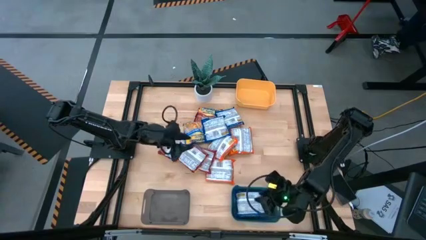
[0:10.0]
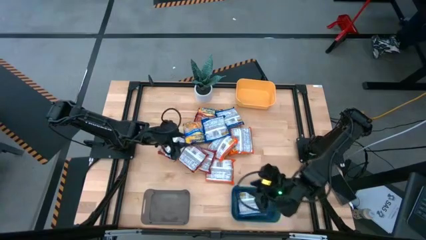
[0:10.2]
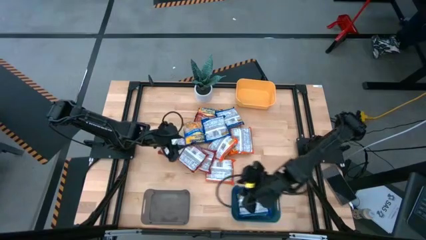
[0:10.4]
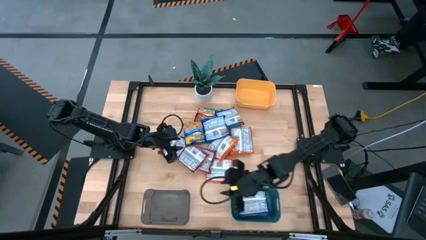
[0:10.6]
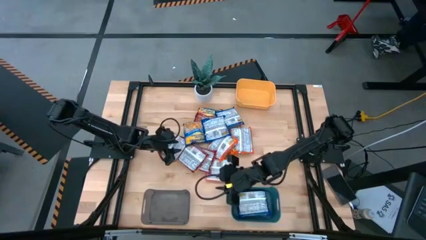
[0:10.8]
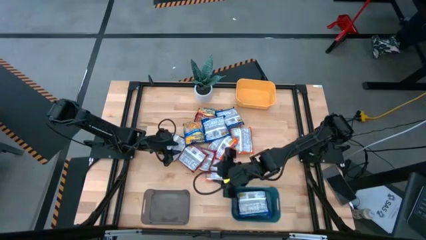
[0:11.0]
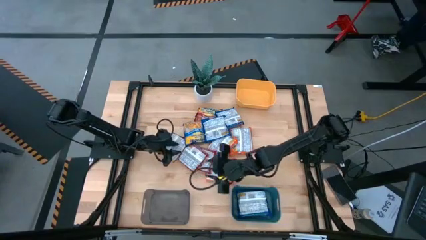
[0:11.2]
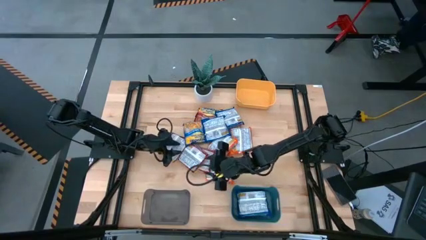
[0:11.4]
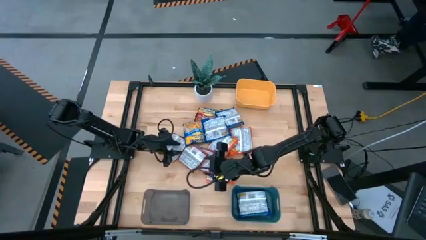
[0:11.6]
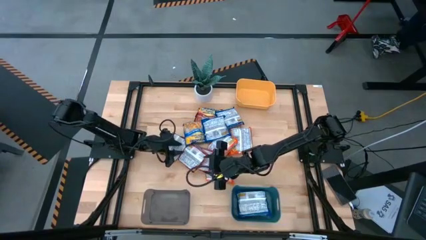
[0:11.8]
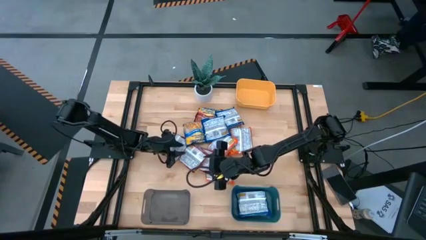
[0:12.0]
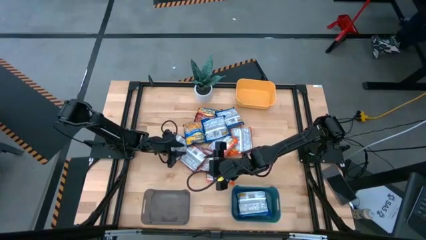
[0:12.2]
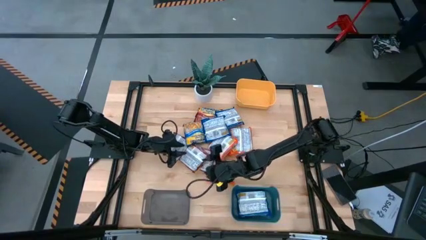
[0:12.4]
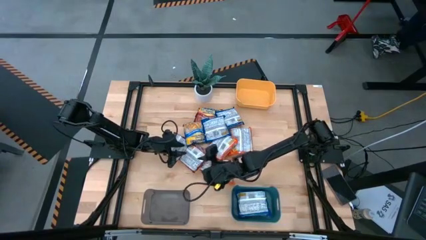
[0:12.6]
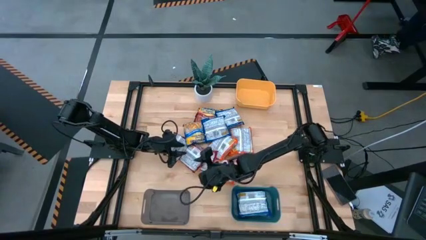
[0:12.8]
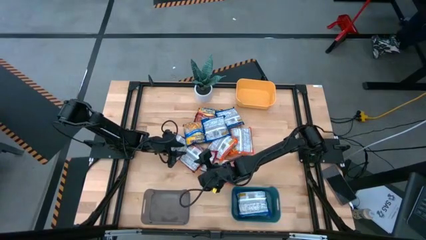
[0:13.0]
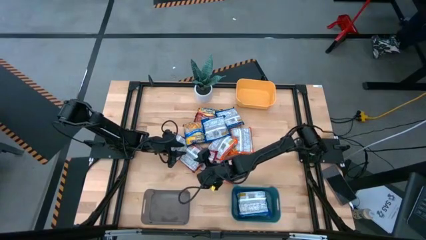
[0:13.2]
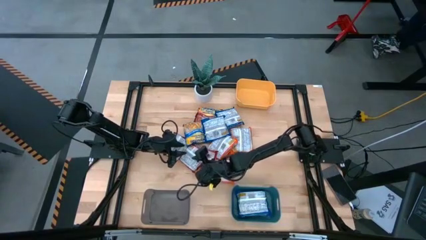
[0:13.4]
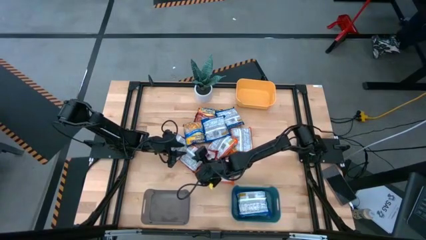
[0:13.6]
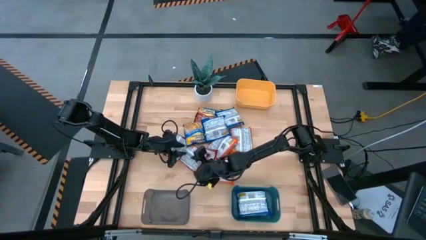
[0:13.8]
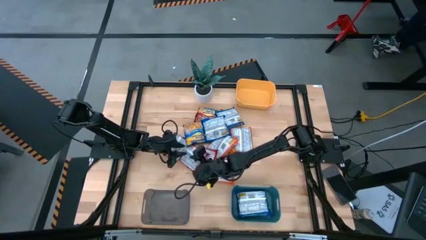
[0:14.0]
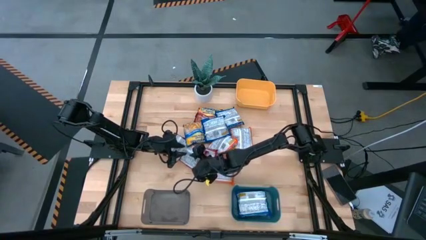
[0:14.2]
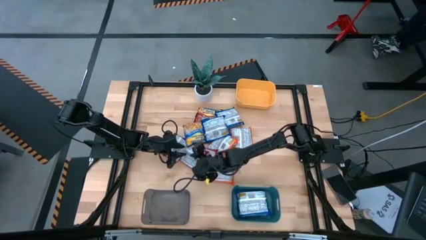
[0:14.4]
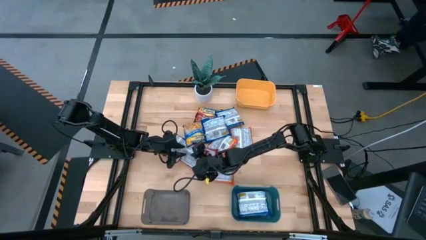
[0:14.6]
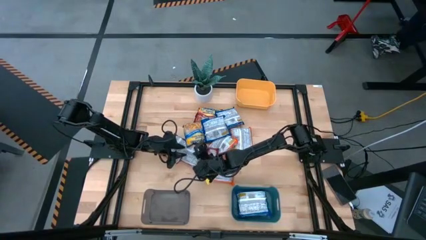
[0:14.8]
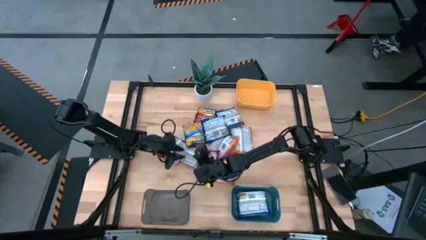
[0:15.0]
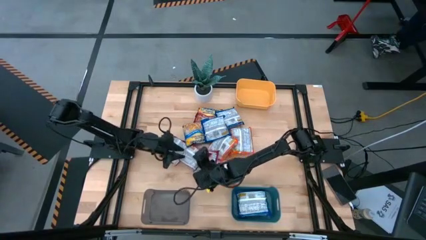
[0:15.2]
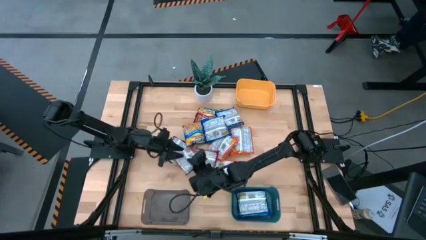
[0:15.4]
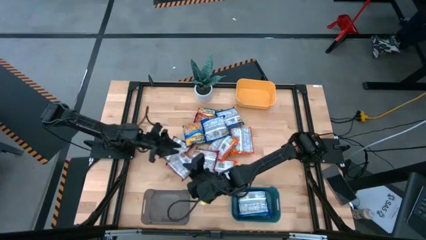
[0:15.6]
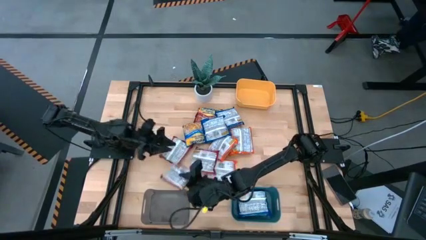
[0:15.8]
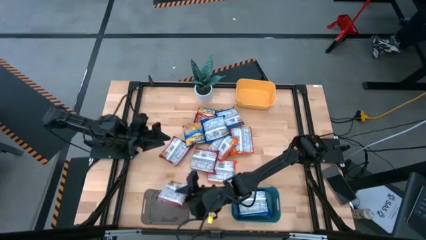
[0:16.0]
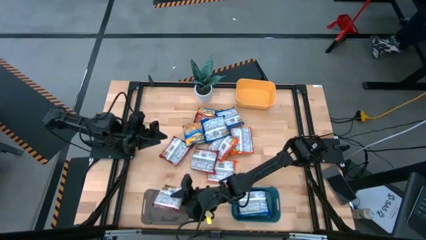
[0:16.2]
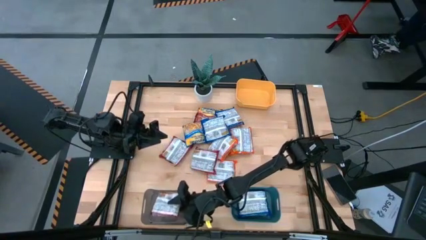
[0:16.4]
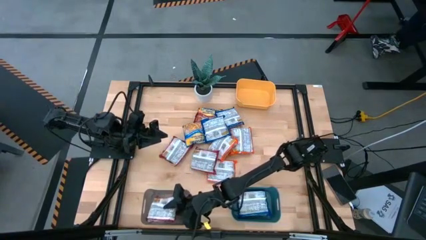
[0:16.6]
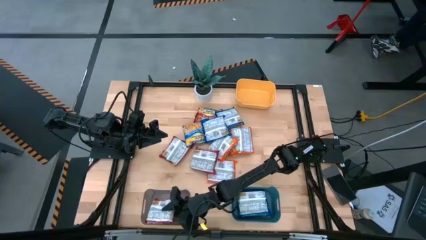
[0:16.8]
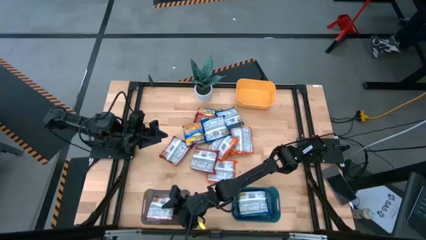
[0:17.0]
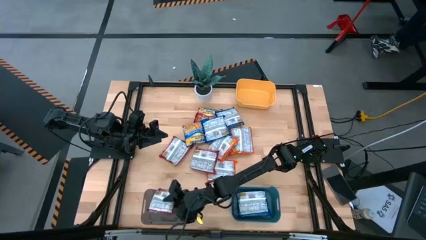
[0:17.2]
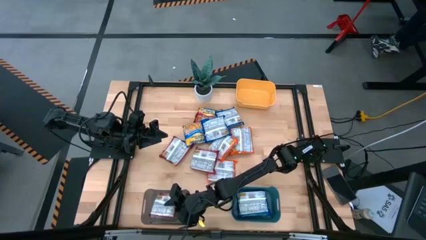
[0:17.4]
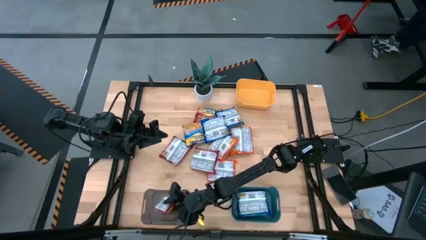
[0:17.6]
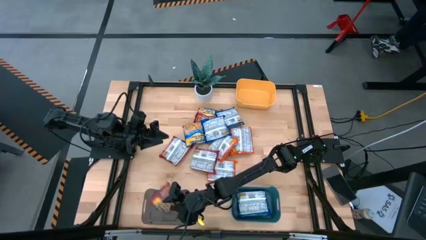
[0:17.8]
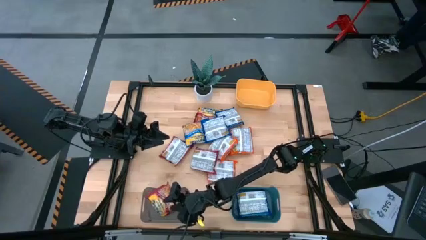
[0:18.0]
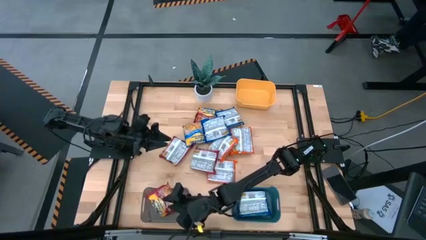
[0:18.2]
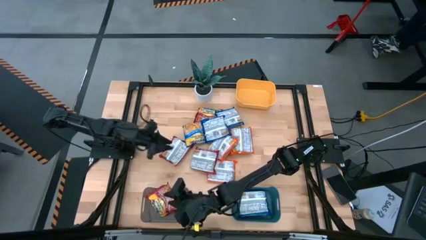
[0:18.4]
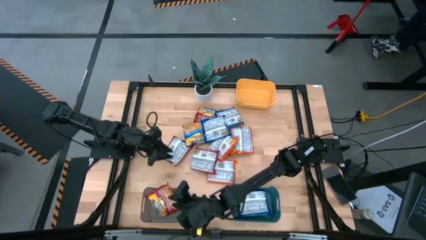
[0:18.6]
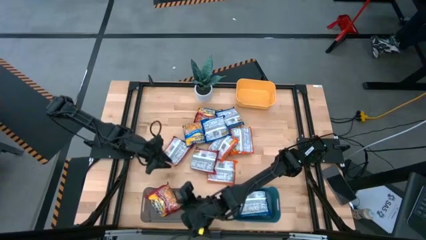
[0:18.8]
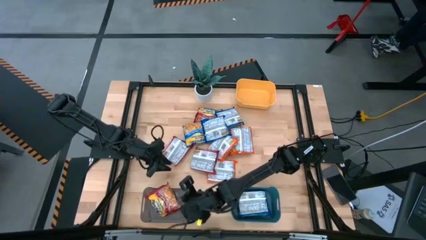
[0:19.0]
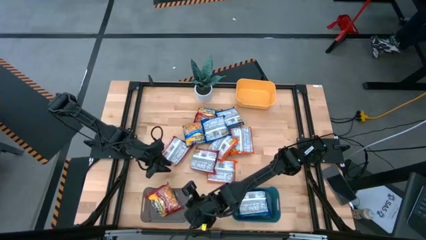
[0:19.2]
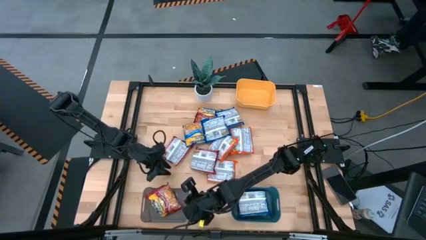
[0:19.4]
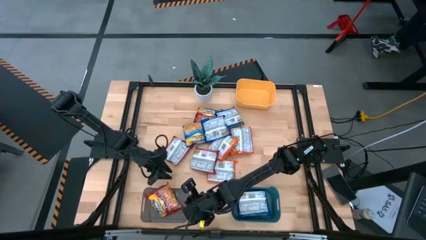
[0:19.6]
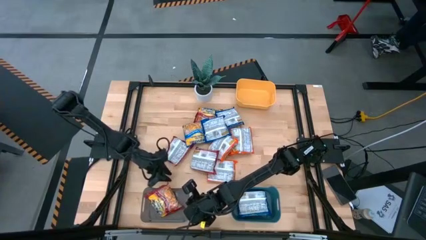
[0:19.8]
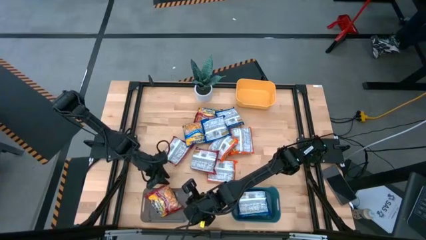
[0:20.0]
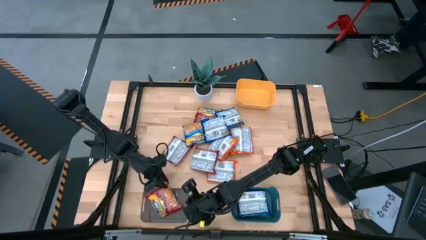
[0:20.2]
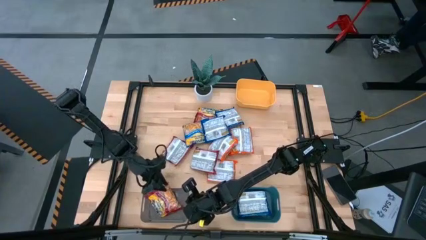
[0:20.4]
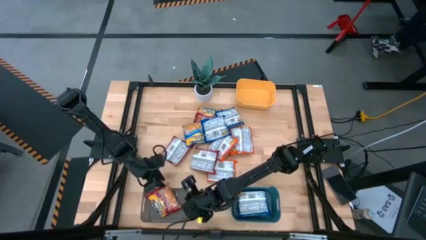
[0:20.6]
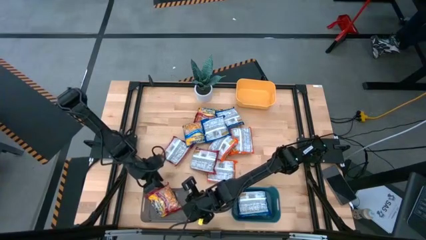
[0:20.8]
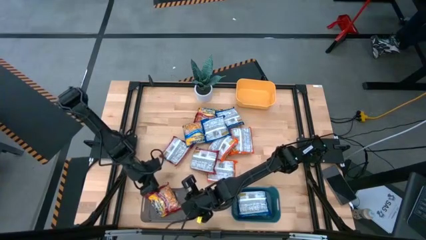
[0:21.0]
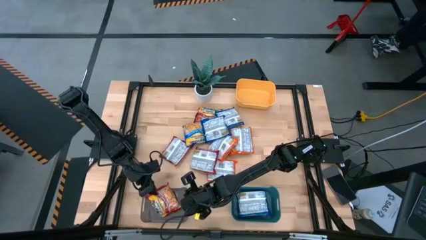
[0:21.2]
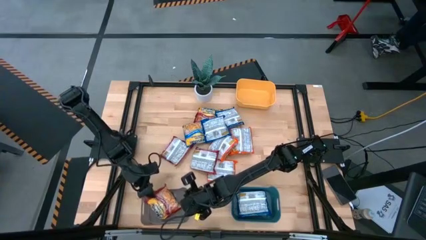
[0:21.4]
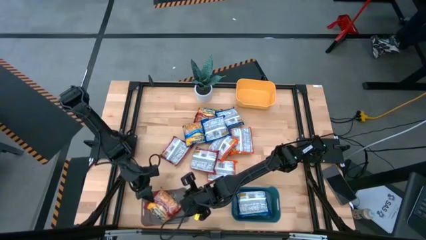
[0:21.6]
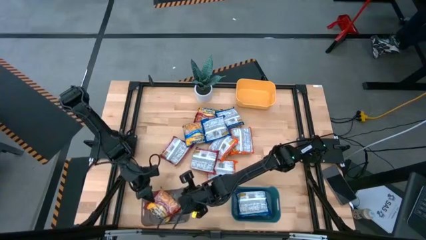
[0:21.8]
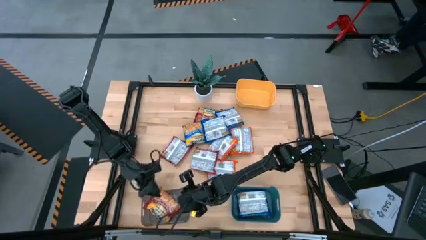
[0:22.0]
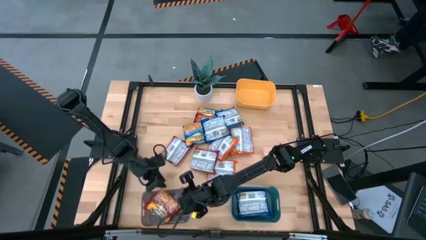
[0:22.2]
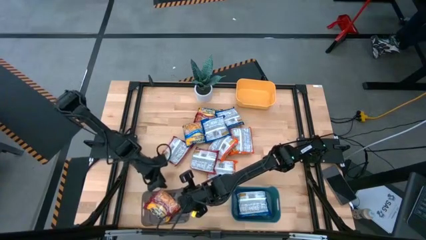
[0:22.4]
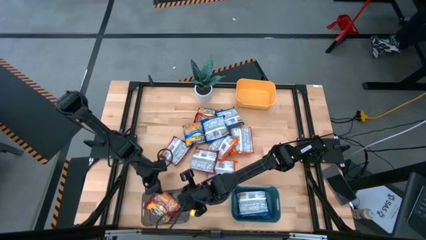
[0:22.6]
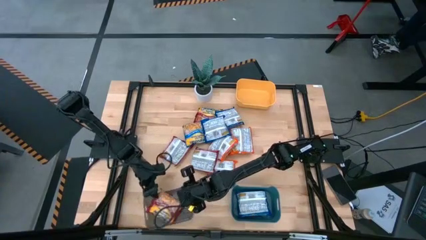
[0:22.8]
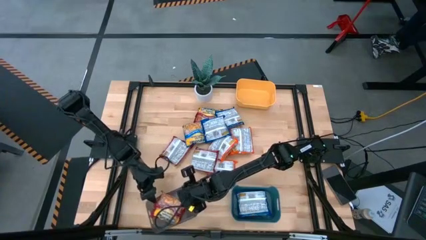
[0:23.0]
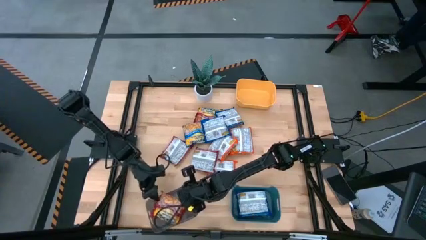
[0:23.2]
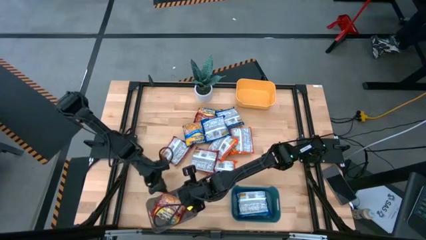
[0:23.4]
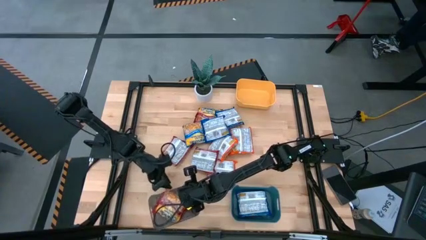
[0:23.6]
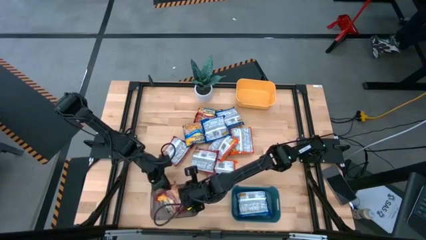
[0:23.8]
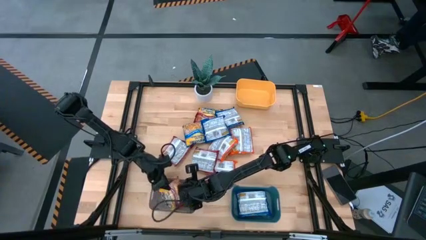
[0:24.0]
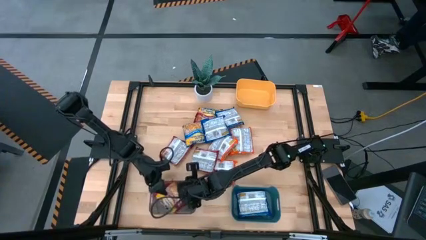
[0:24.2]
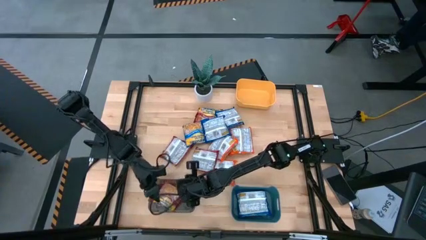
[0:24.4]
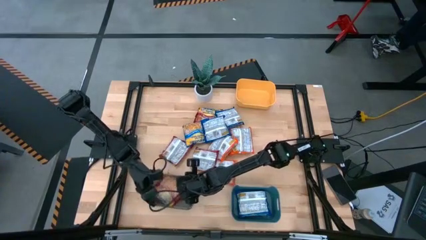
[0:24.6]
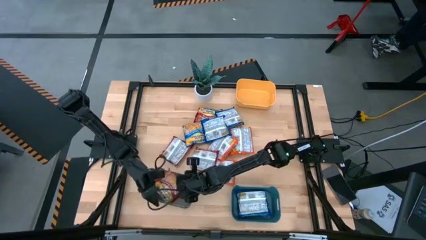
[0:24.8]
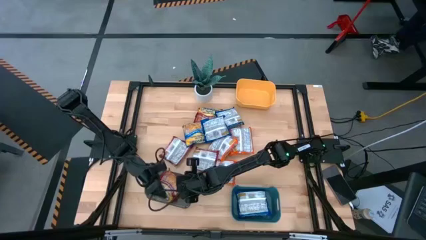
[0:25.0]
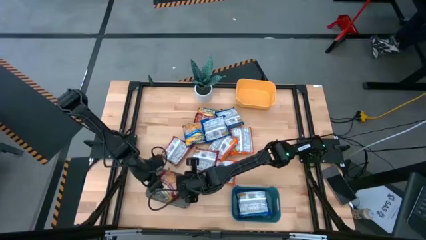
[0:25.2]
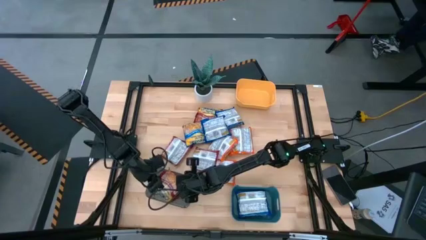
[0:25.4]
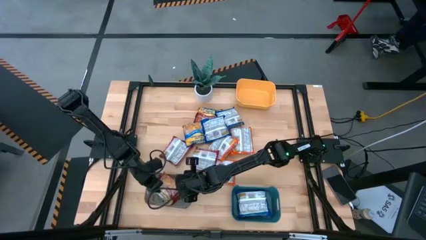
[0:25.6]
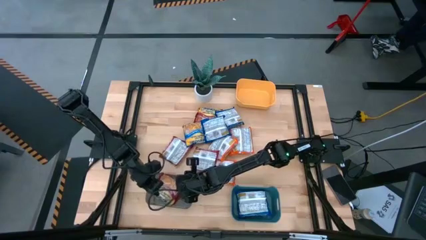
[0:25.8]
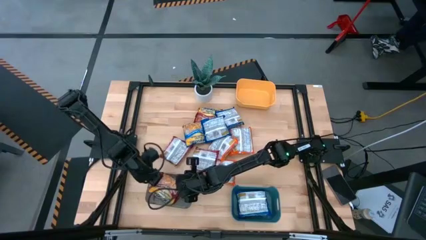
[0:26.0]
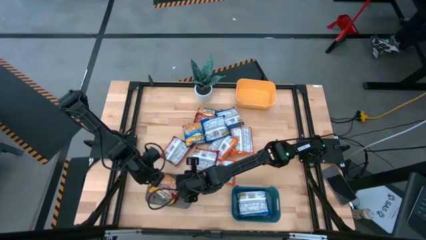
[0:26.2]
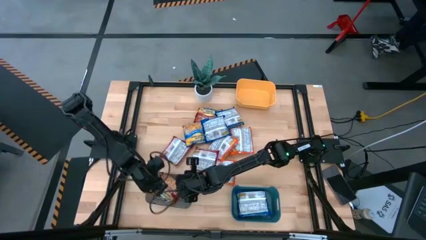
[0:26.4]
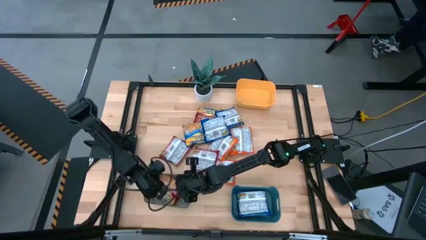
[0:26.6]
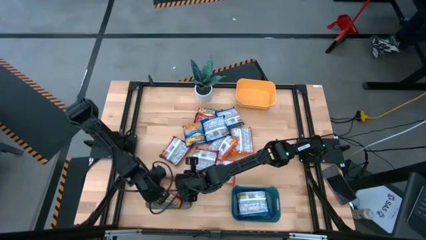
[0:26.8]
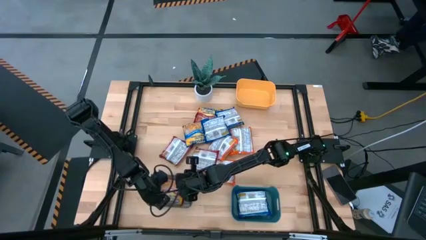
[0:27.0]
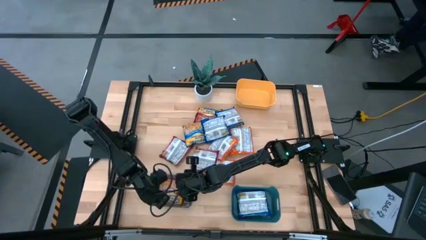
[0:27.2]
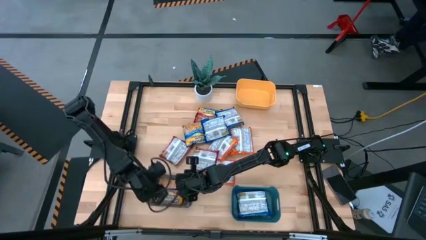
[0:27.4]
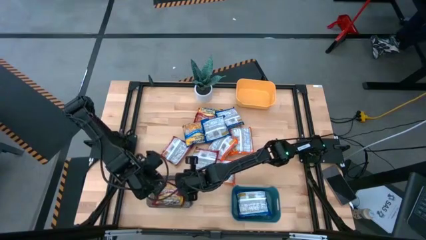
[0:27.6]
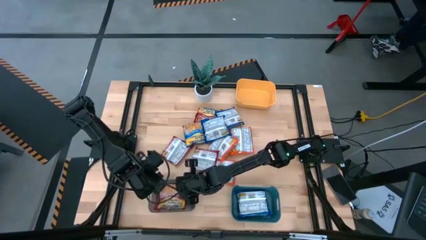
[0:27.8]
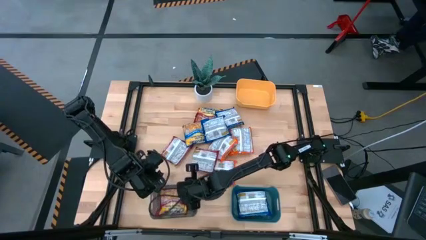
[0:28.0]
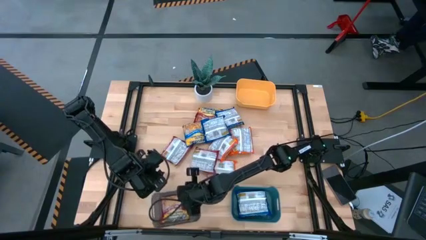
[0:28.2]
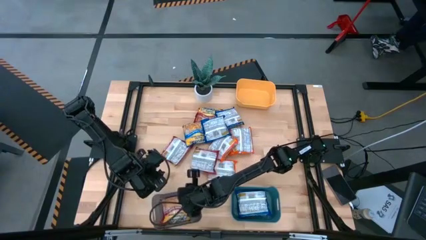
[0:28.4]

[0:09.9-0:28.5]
Task: Sort Maruchan noodles
Put the red noodle pack into the black bin
